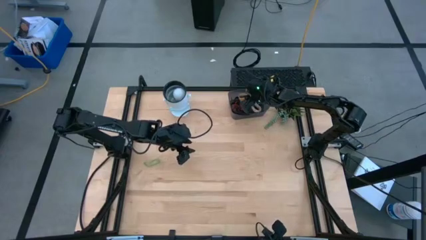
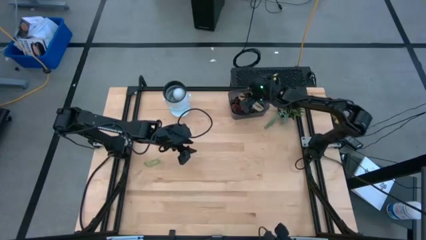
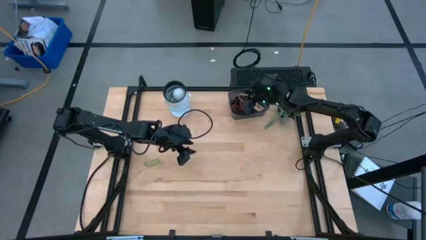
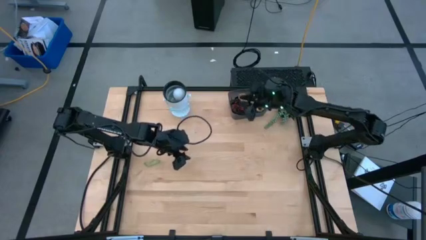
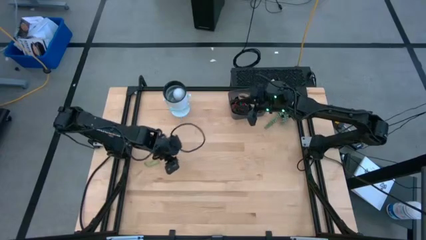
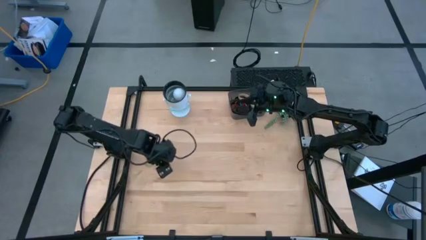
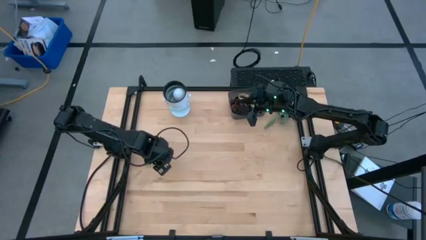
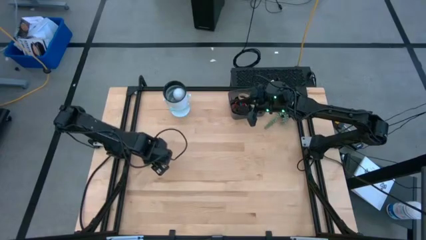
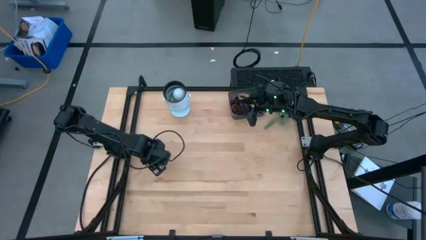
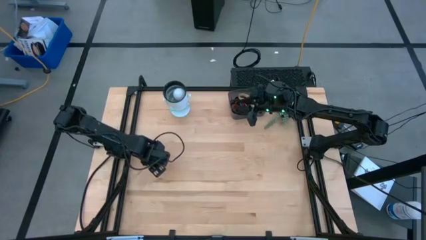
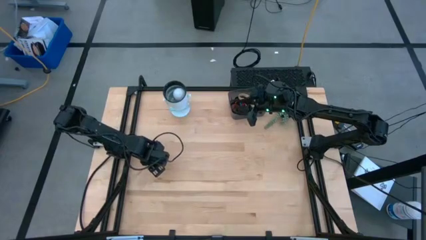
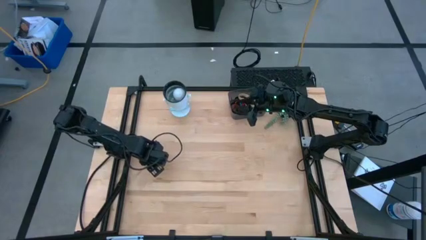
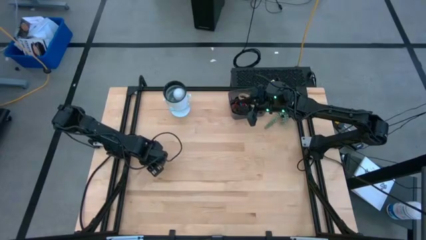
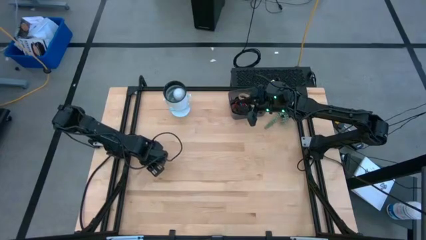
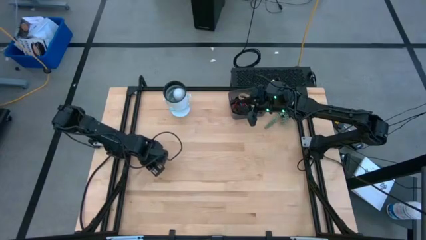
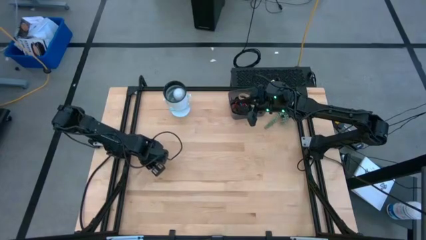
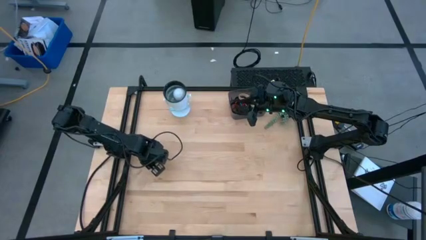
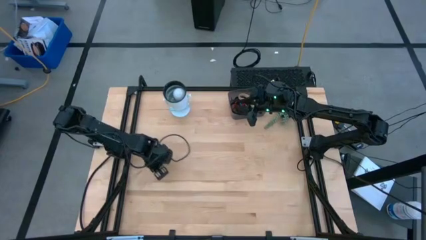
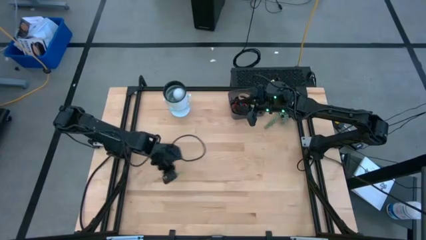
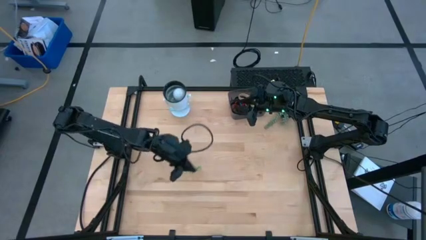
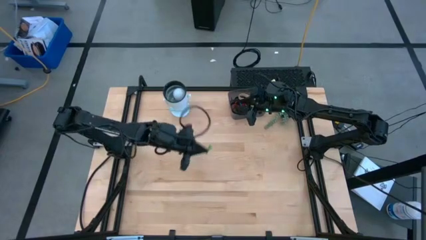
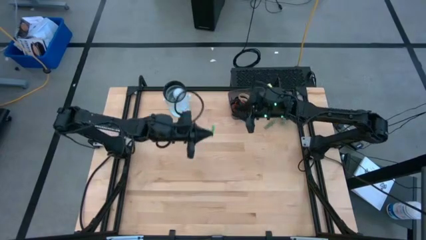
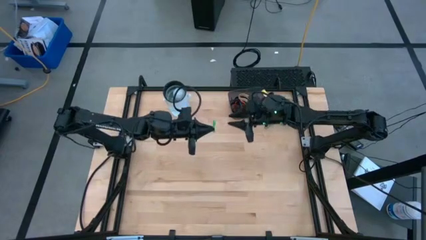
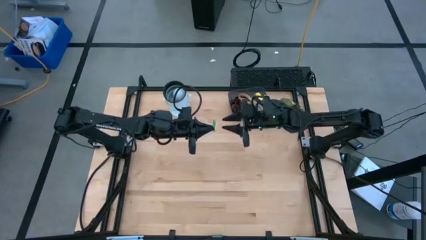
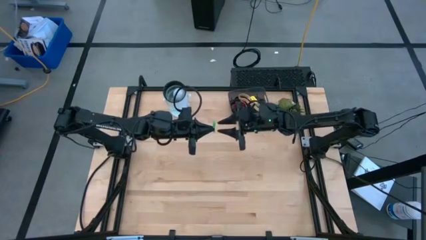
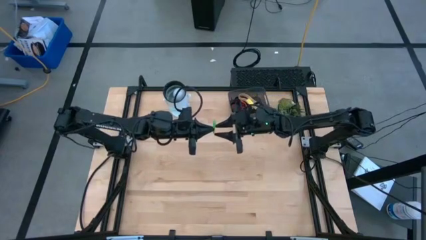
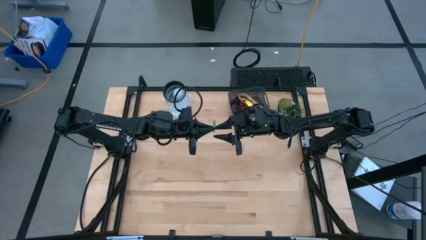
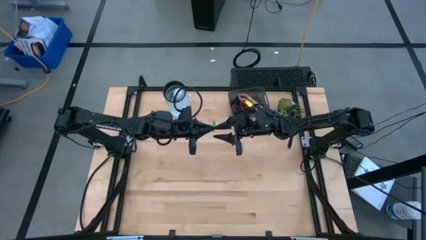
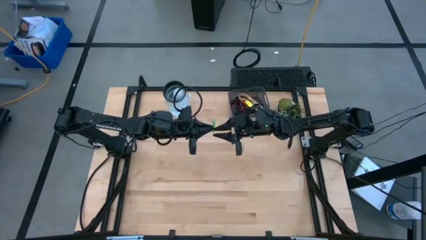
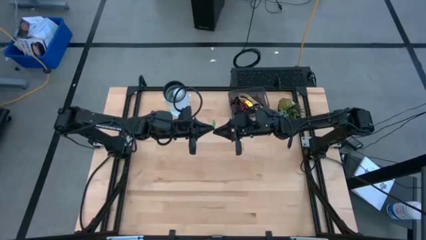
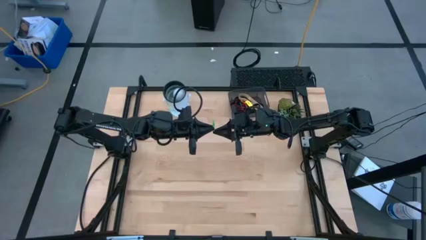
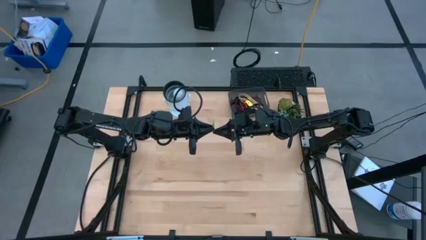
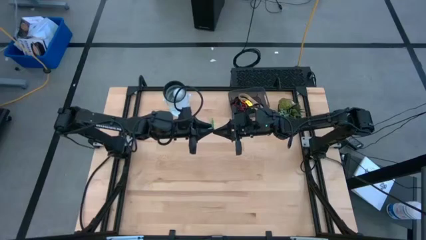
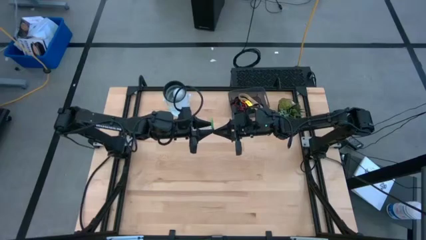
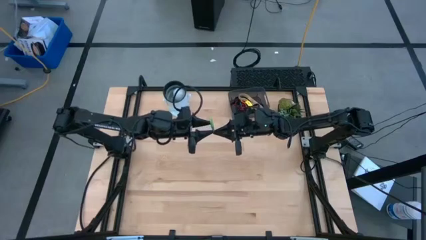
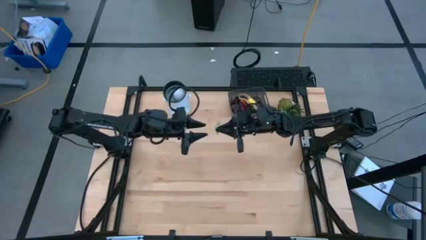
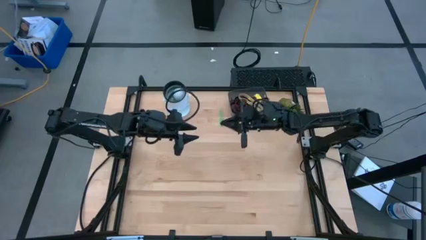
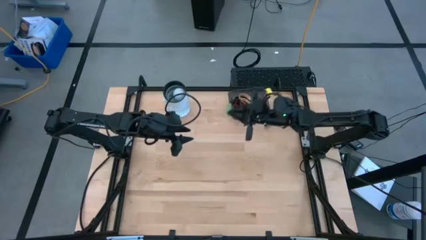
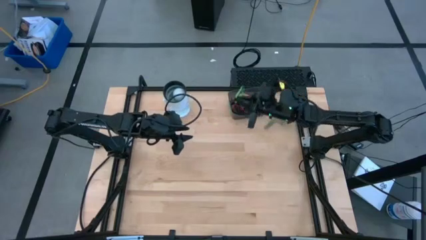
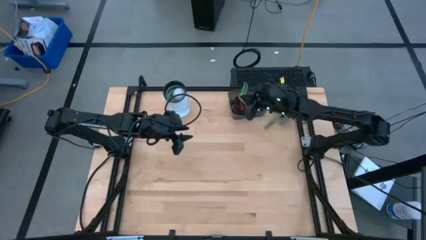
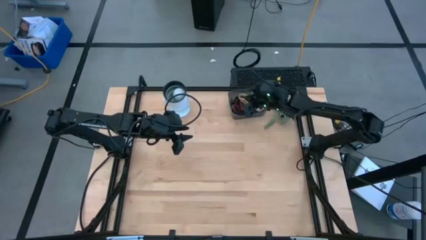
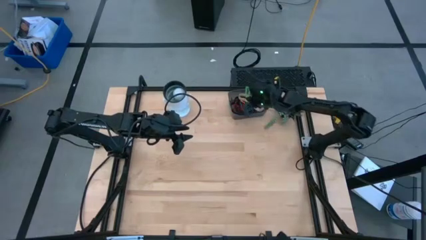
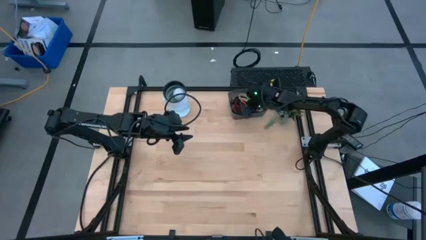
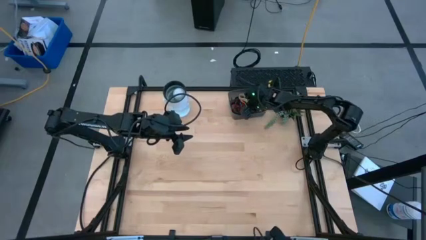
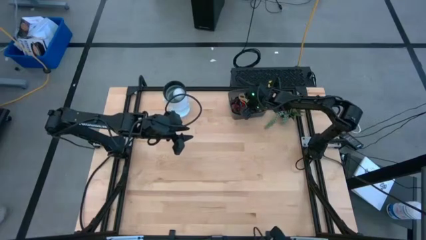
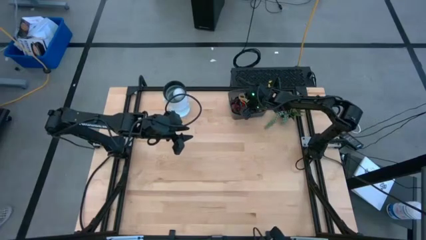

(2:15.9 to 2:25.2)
Task: Pick and place rubber bands into bin
Put the green rubber band into the black bin

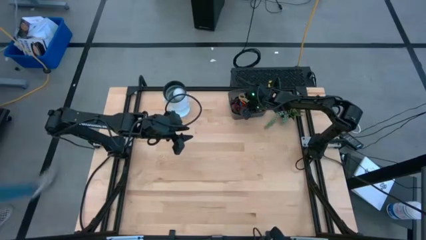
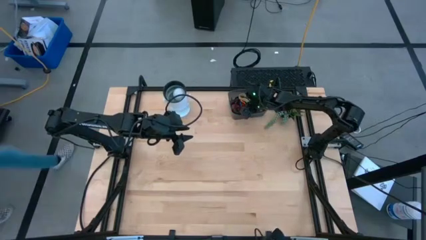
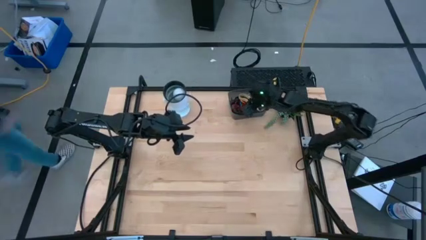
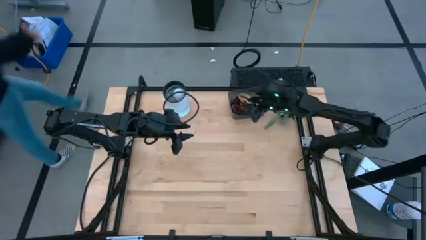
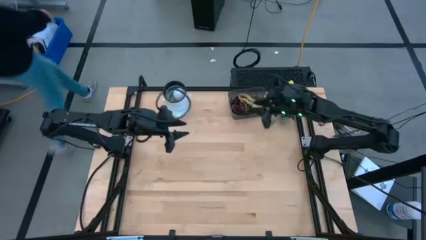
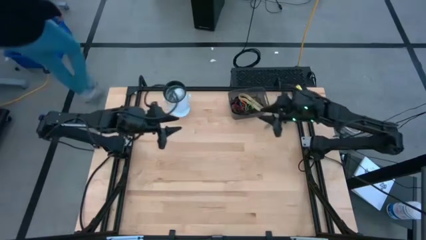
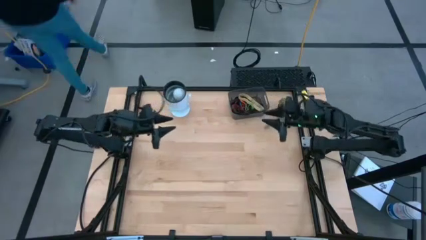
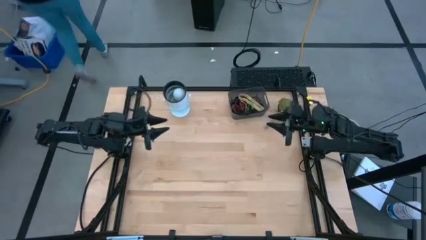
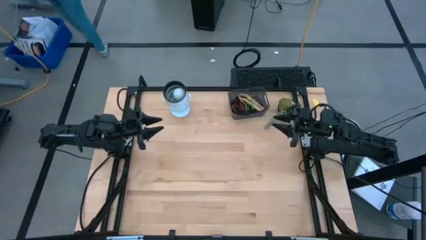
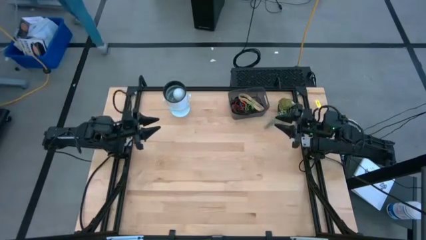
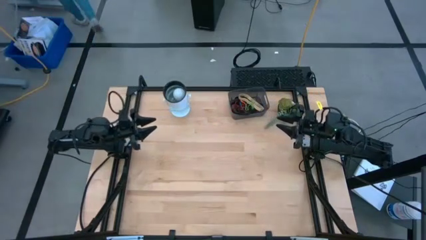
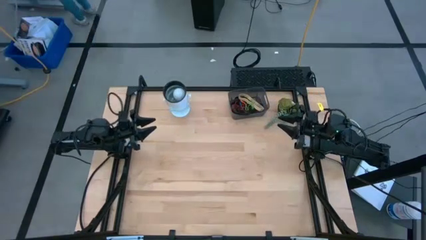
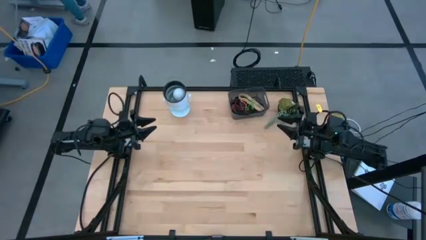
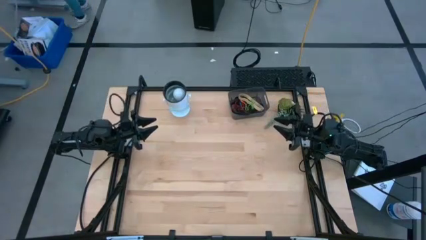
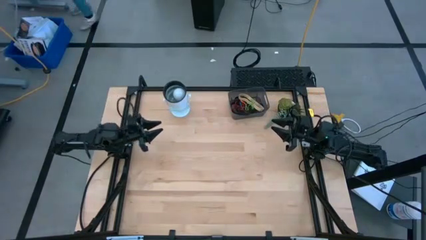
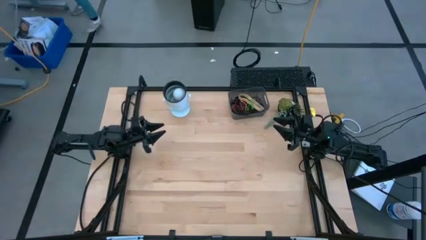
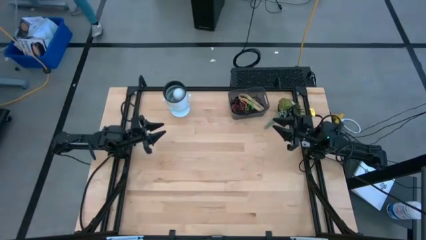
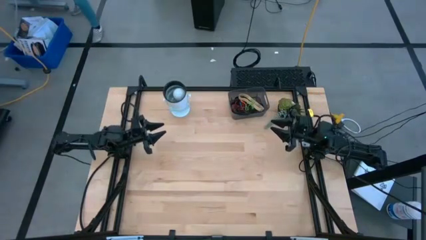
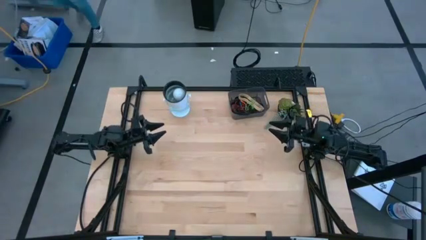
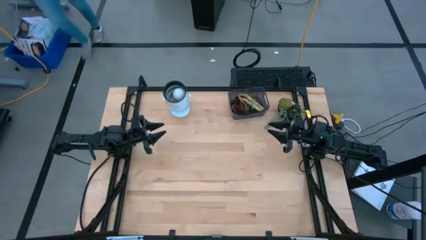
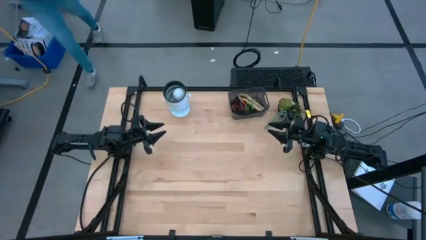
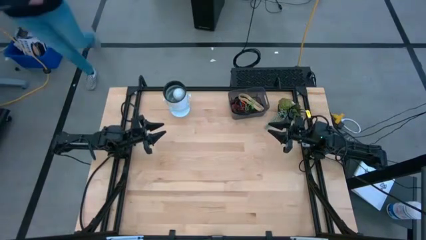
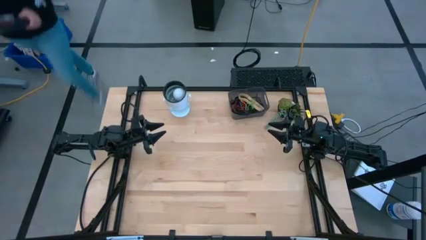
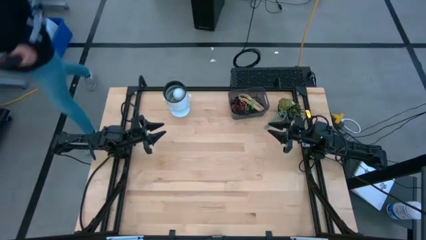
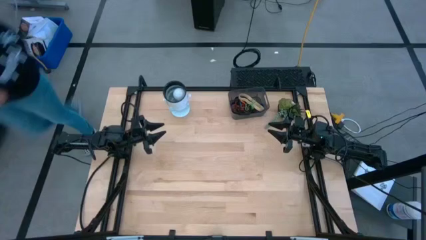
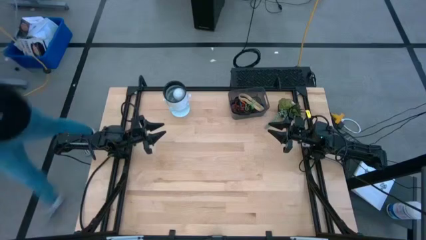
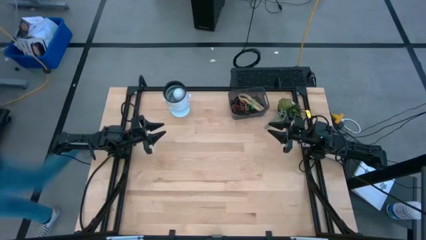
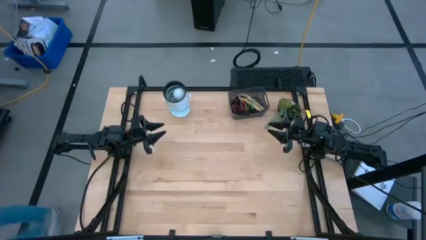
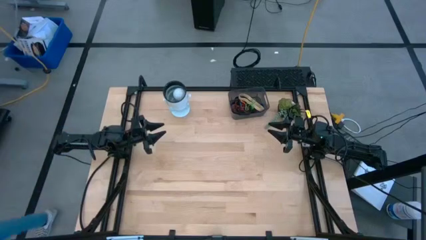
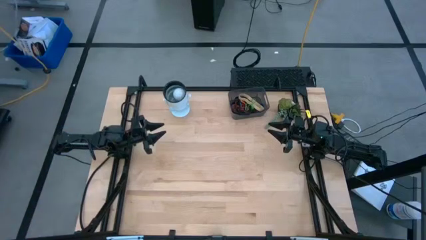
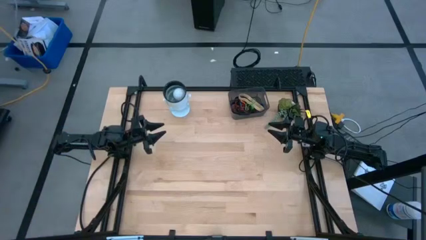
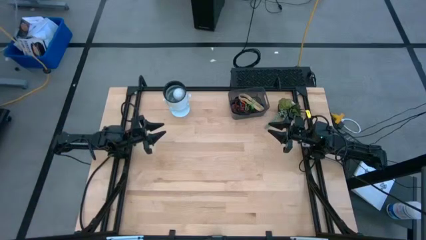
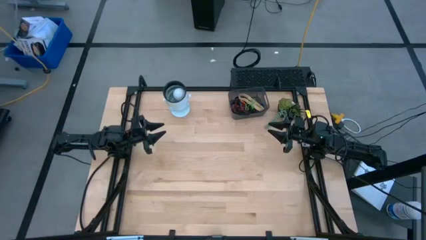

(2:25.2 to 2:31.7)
Return to Home Position

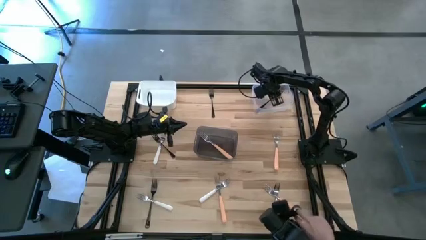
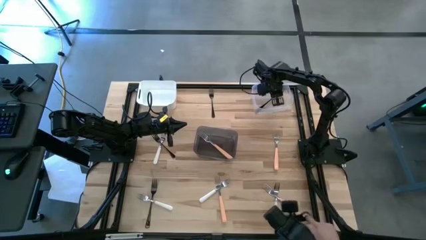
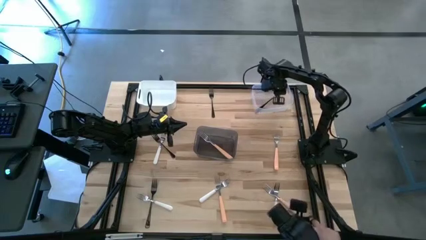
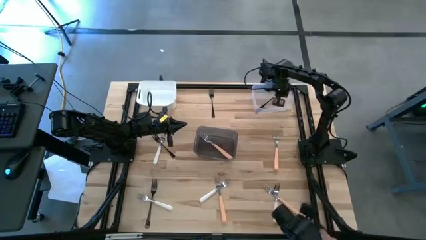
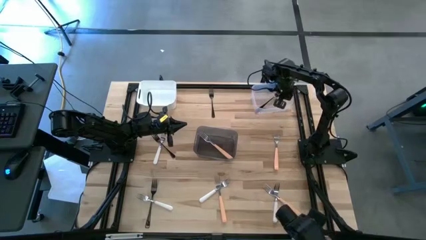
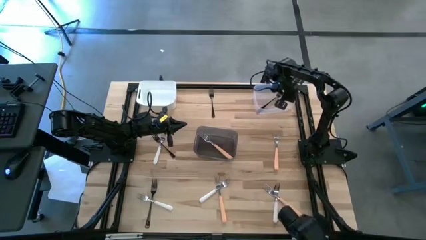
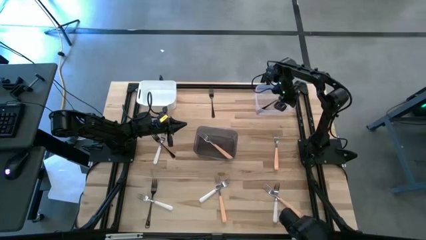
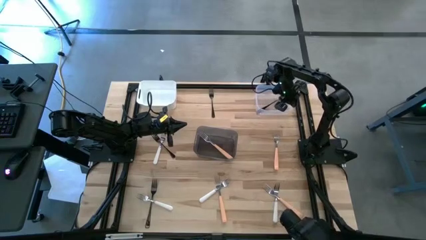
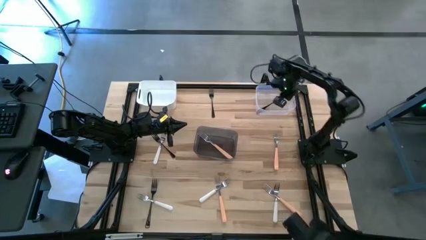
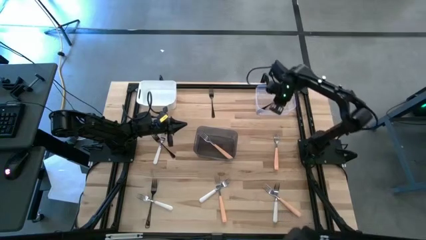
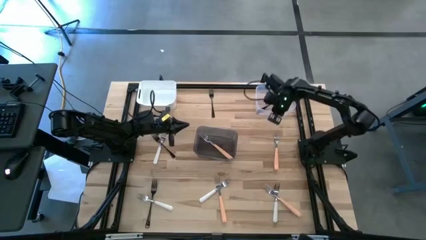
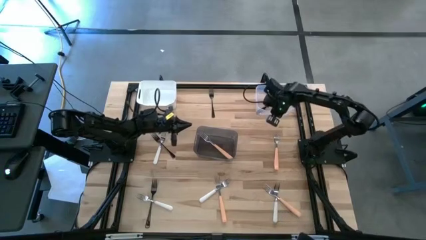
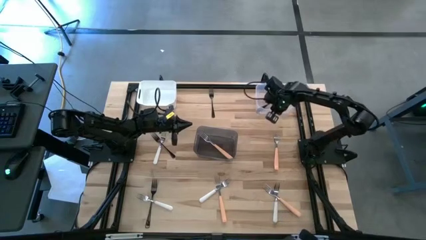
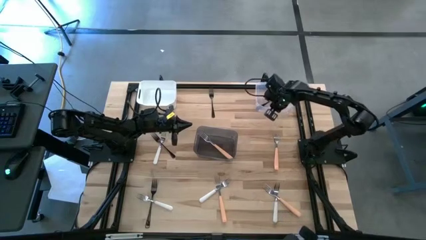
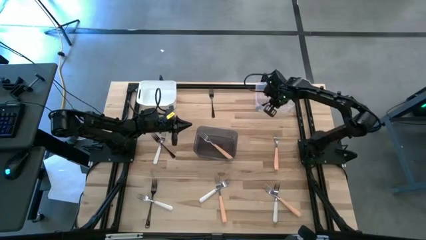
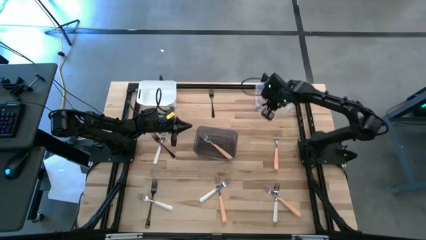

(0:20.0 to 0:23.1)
Task: Sort silverware by color (type)
Adjust the white bin
